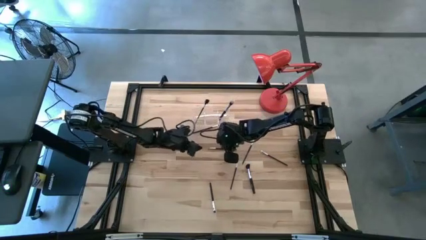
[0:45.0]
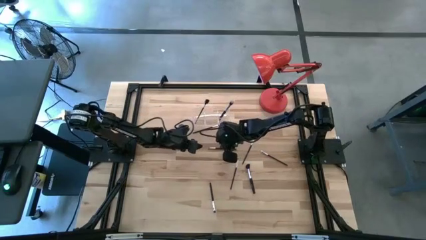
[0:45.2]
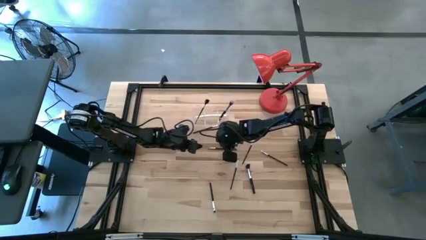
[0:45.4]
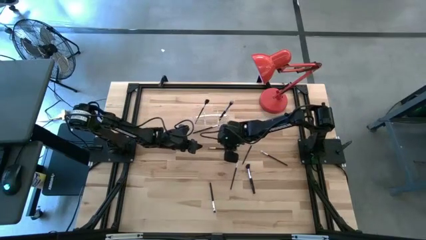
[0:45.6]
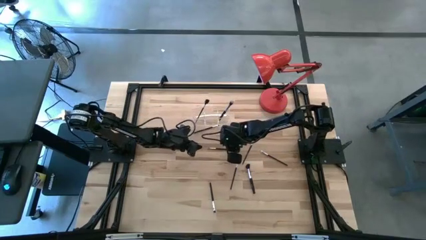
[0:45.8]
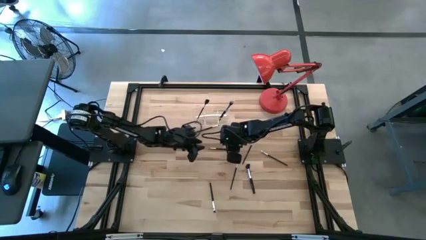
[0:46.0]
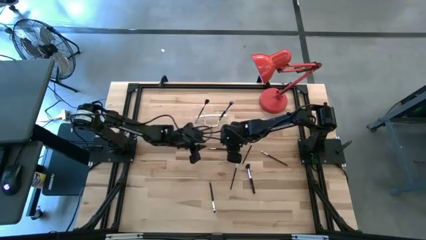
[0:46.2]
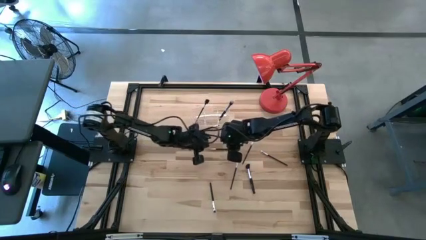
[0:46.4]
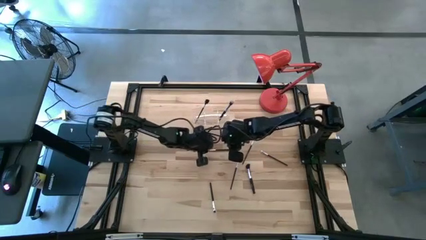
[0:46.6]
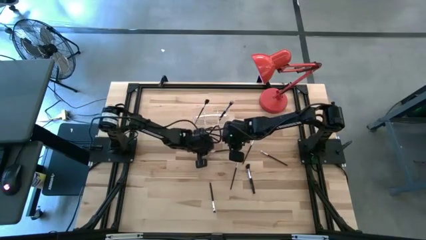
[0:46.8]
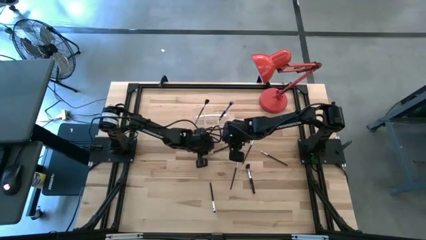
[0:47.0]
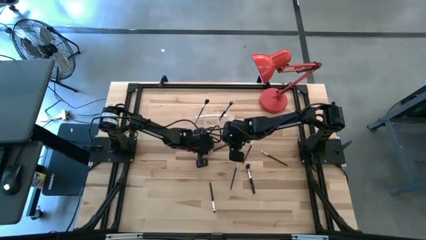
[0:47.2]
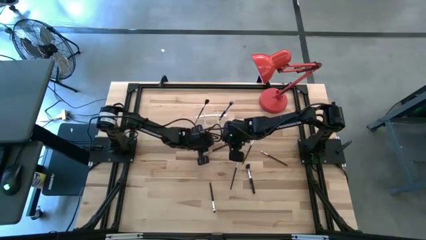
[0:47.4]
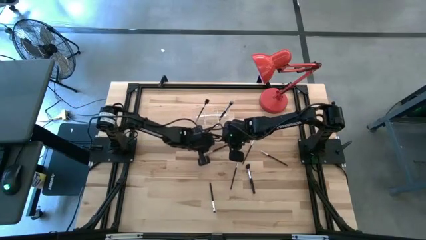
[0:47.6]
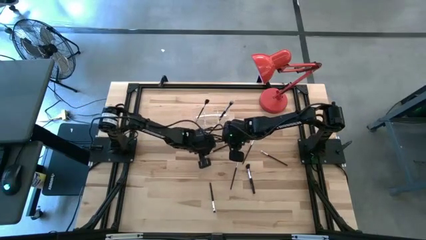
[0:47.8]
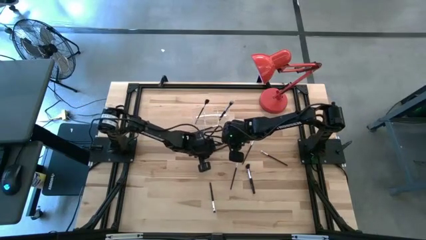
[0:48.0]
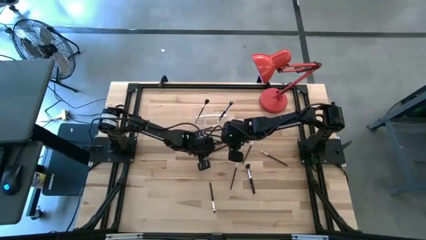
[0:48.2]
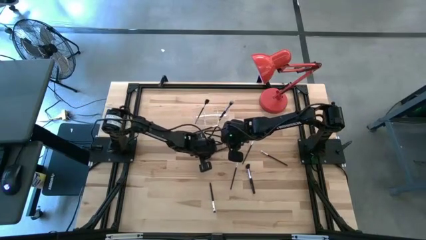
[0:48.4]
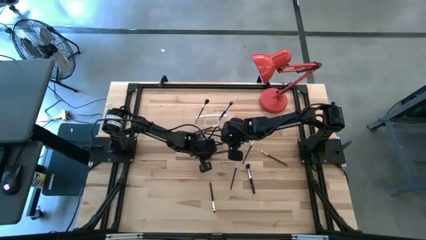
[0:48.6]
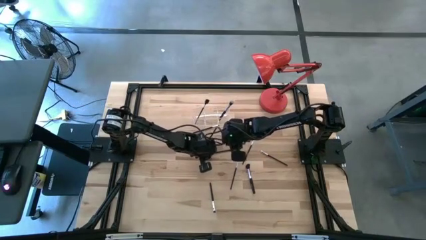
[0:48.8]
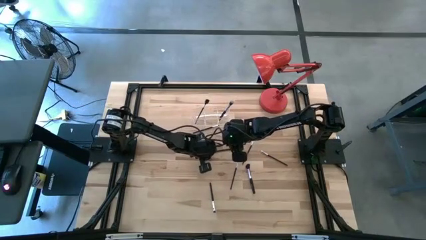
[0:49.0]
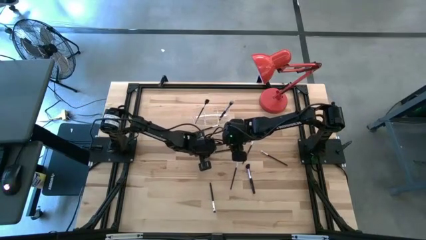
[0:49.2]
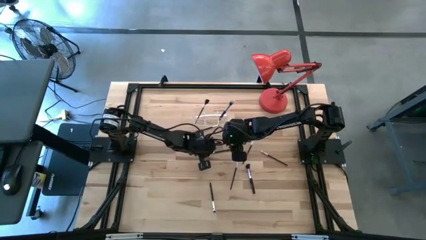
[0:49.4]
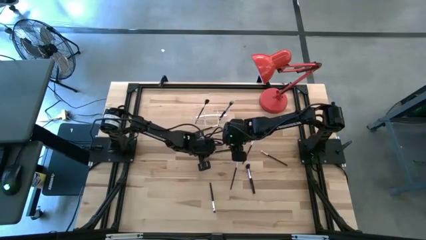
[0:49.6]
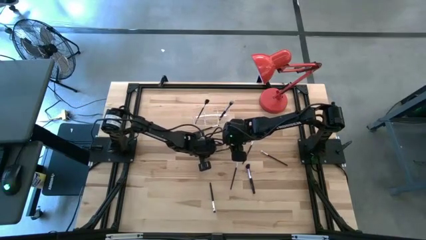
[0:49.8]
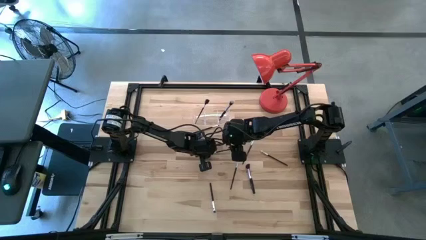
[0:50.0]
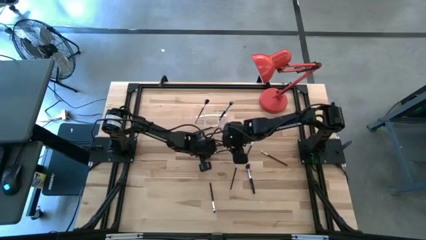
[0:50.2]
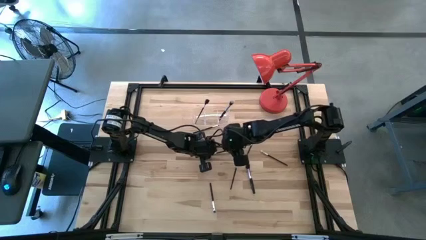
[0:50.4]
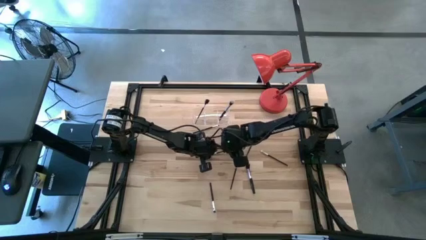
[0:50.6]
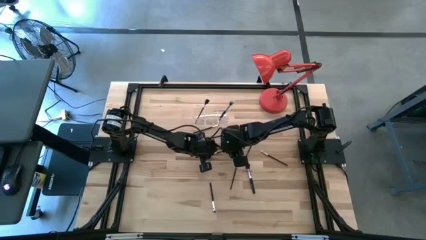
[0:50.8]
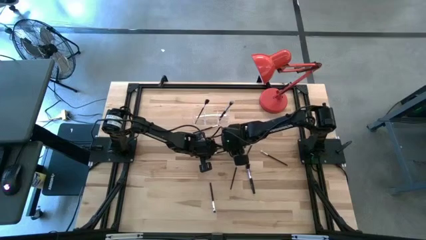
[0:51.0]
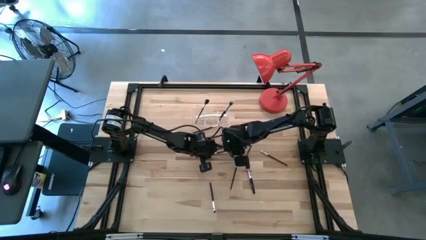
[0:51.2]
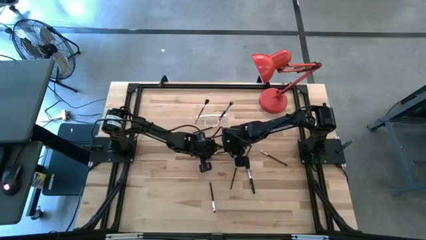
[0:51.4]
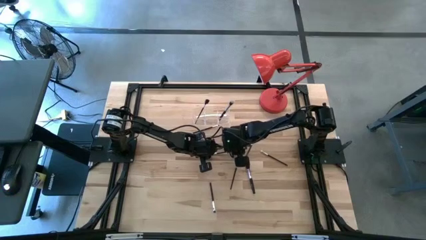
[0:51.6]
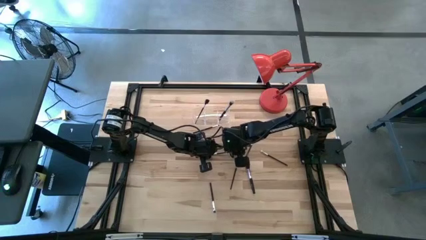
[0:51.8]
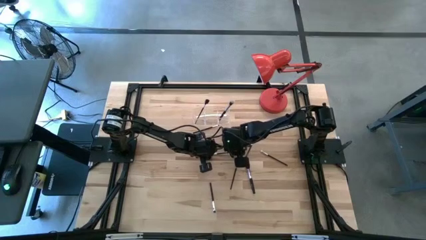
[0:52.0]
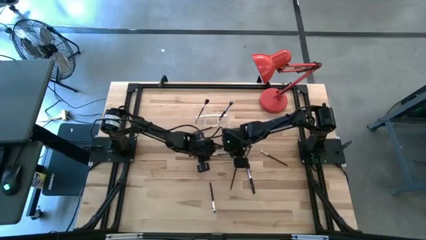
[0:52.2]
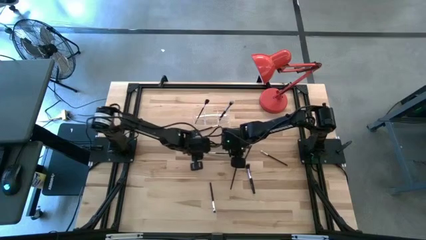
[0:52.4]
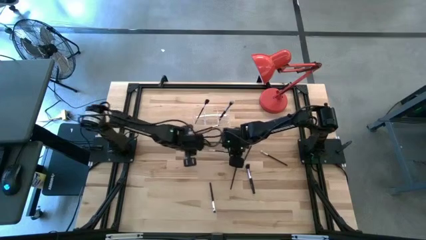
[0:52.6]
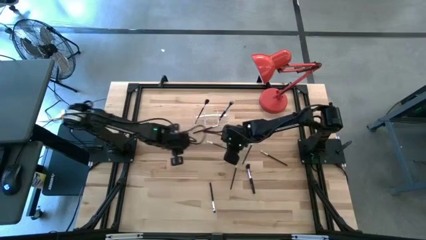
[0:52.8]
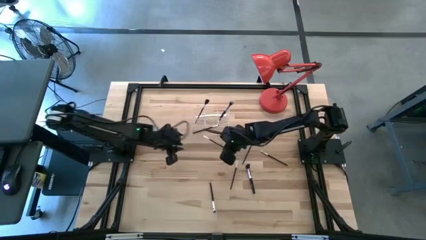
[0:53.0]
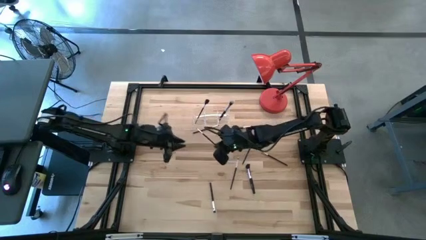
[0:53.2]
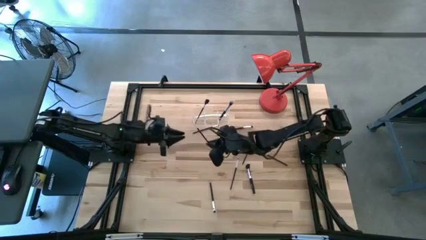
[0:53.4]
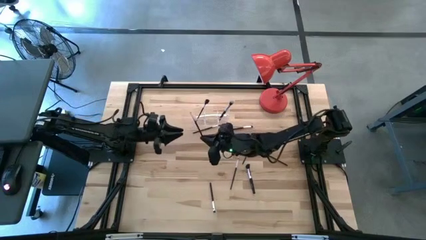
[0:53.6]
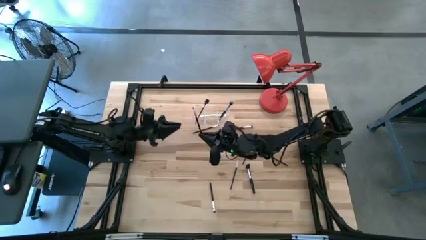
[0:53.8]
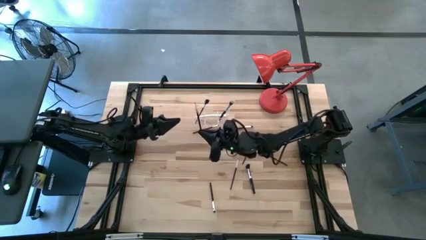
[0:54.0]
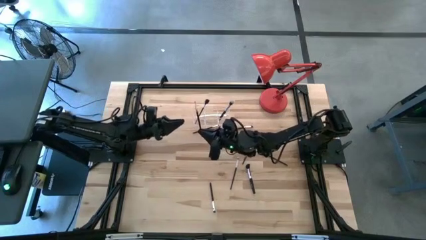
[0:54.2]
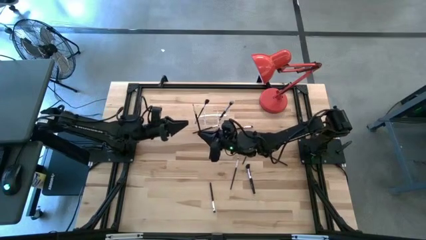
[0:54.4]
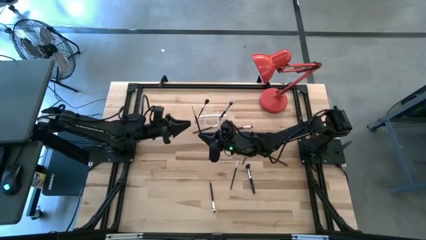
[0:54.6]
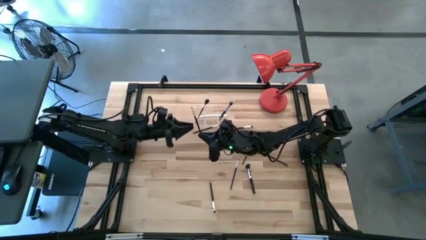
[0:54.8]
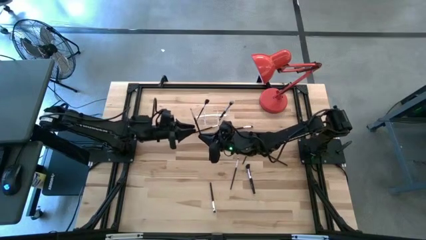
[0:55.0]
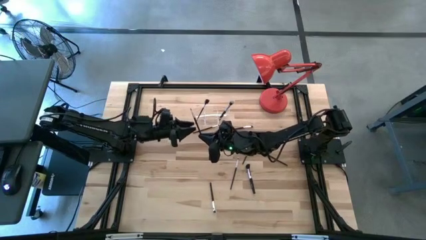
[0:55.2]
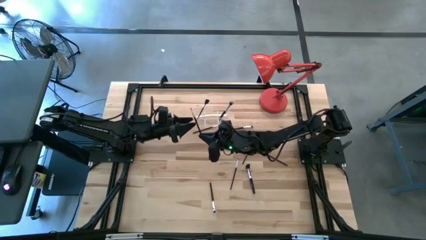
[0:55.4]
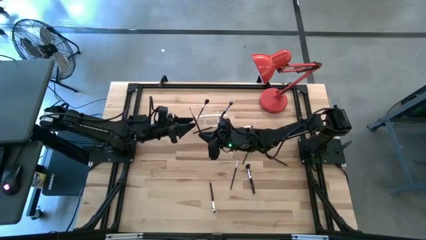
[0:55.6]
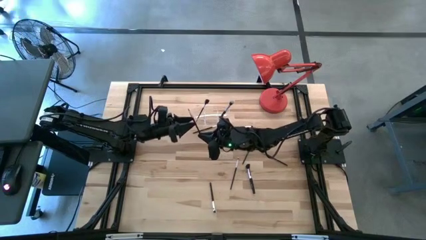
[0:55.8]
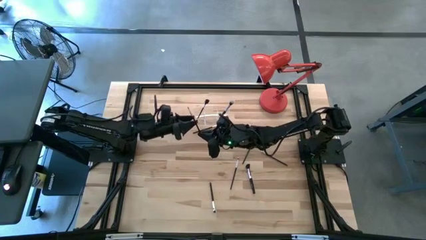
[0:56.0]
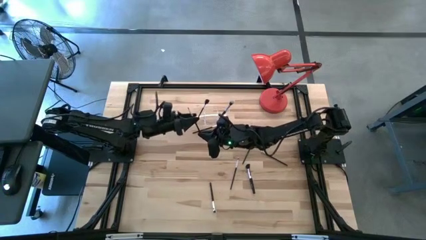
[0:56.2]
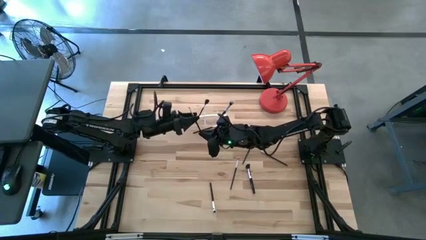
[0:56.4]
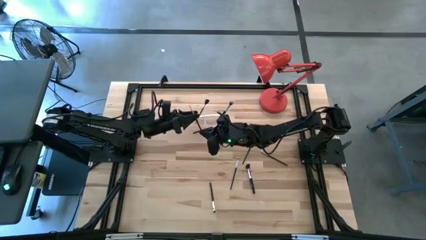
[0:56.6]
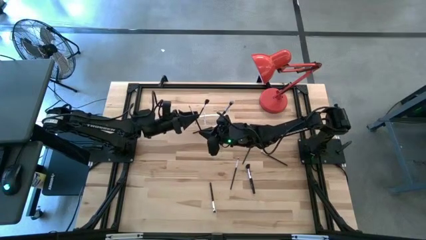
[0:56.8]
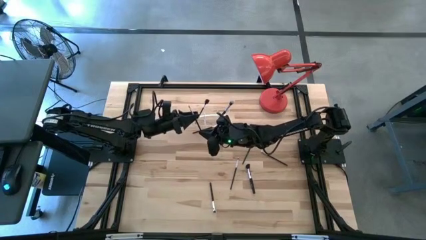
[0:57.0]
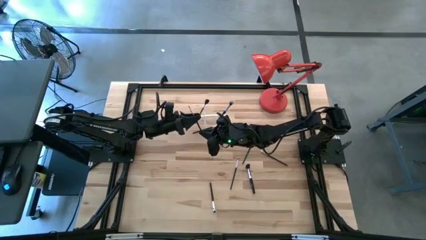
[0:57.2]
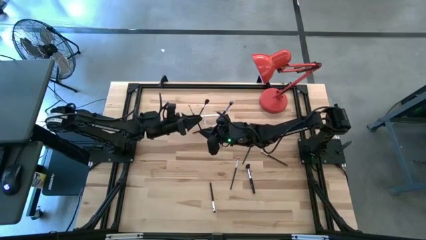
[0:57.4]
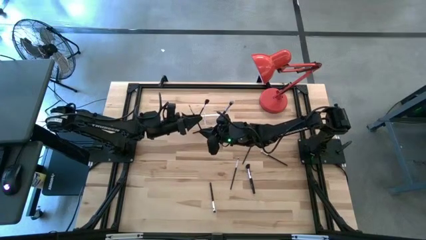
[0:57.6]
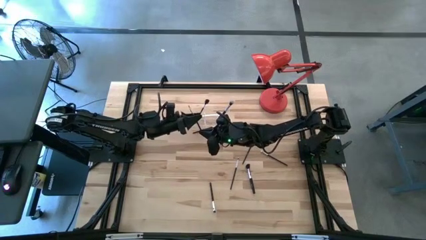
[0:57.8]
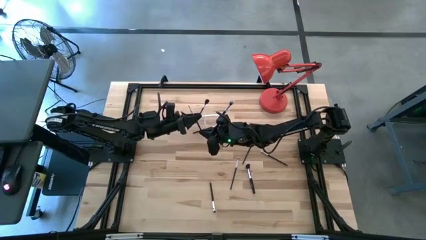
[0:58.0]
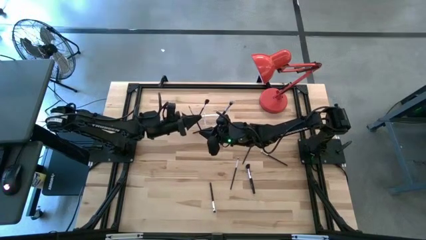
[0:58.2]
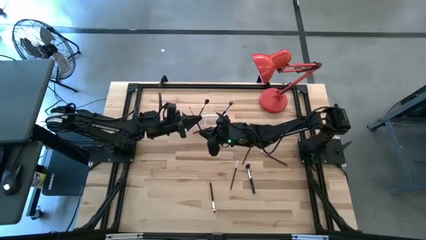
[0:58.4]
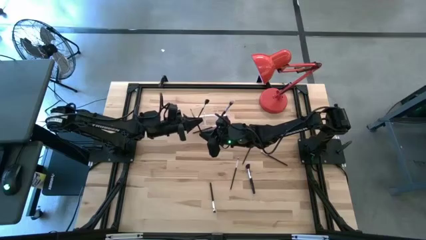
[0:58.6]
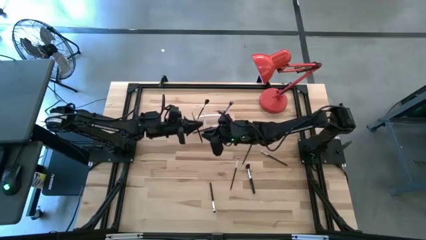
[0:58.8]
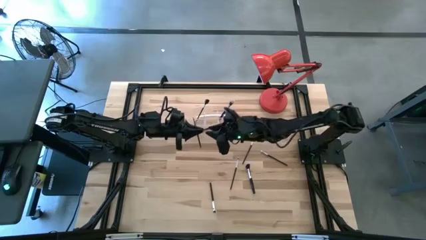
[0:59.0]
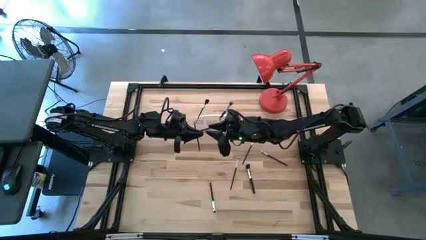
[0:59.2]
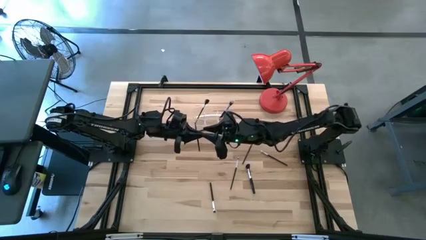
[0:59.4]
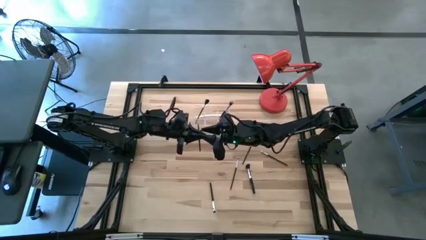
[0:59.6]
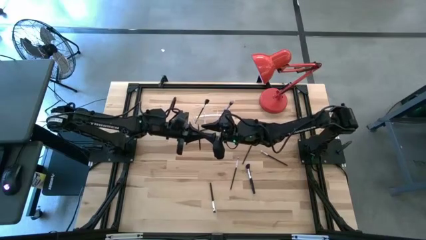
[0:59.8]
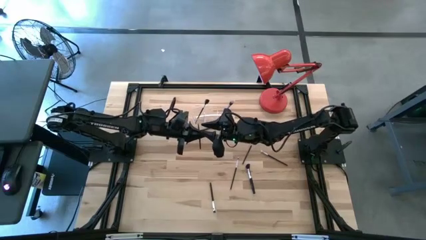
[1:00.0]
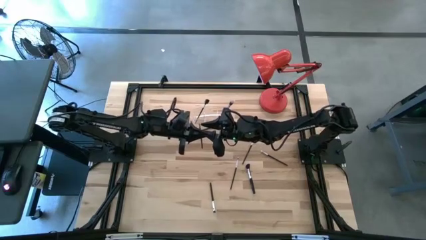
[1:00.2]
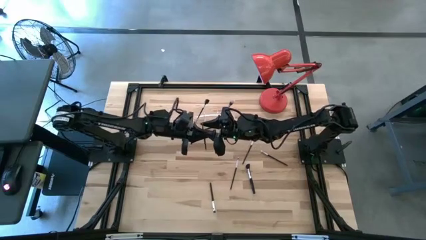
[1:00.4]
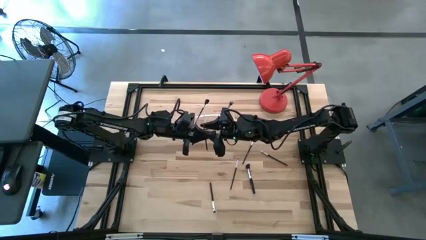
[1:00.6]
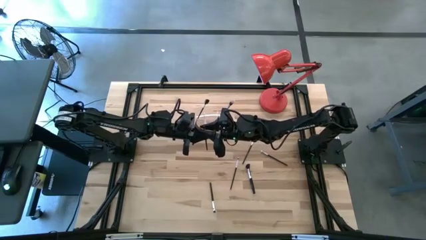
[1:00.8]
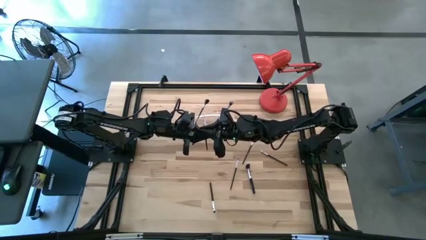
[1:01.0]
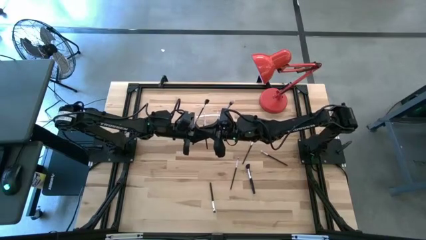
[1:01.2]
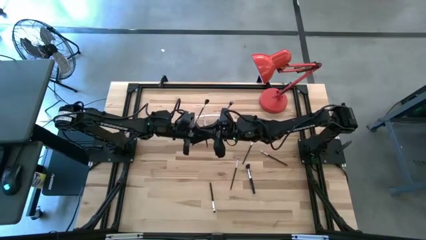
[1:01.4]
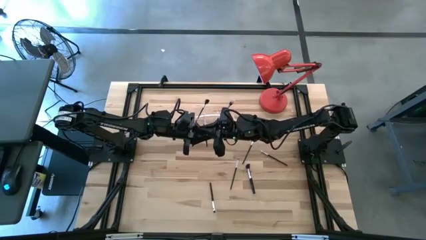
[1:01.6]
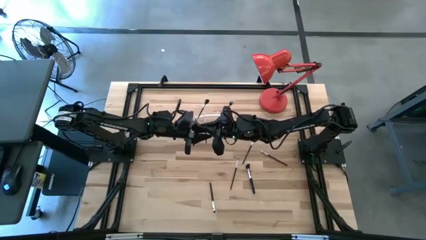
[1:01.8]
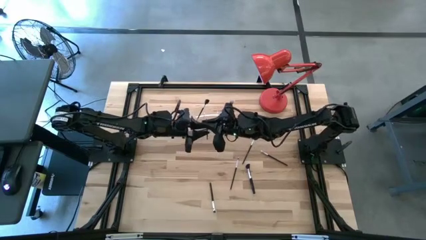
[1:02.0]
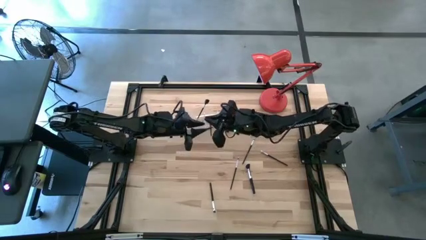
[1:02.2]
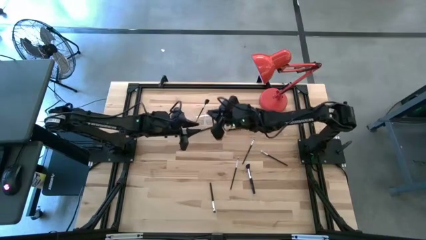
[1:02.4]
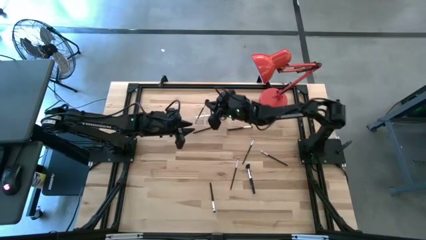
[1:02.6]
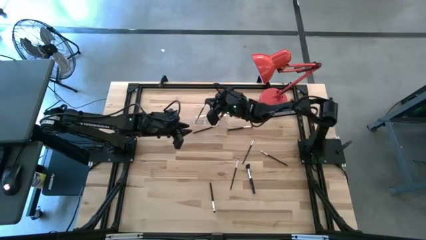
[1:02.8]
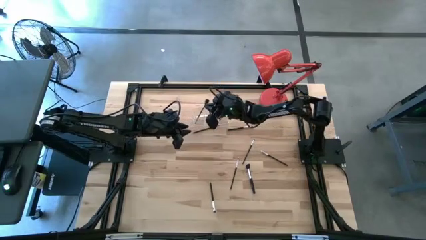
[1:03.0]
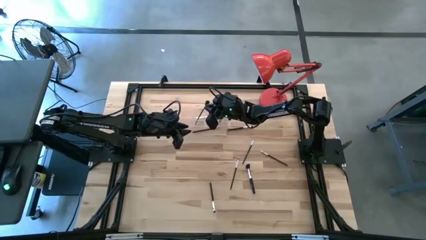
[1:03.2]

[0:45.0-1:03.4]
Task: Put items in baskets/containers
Put the black eyeshadow brush into the transparent organizer
